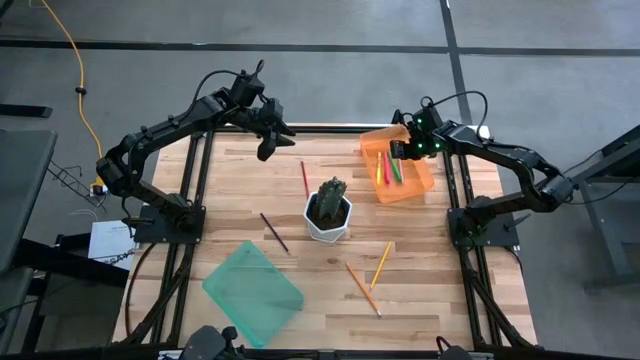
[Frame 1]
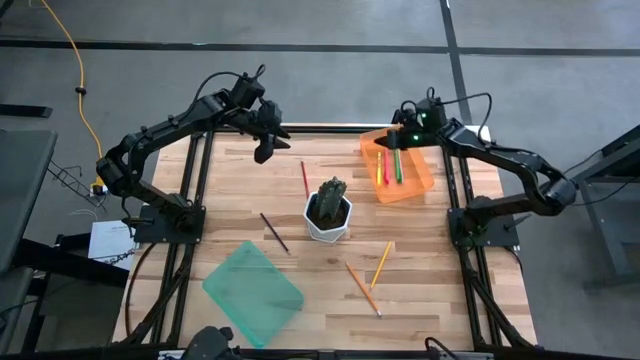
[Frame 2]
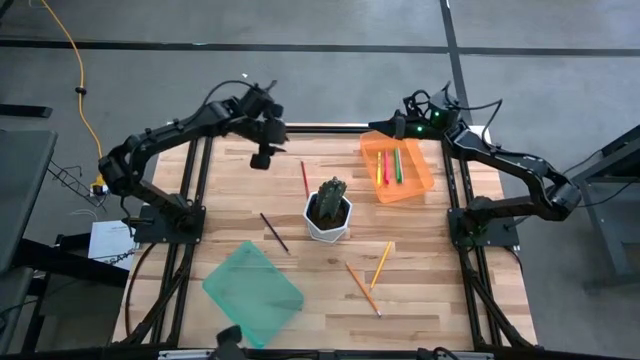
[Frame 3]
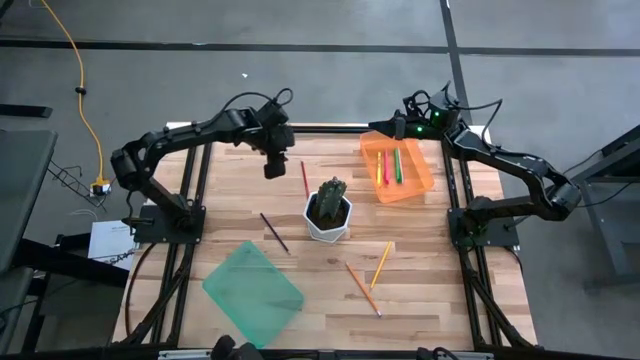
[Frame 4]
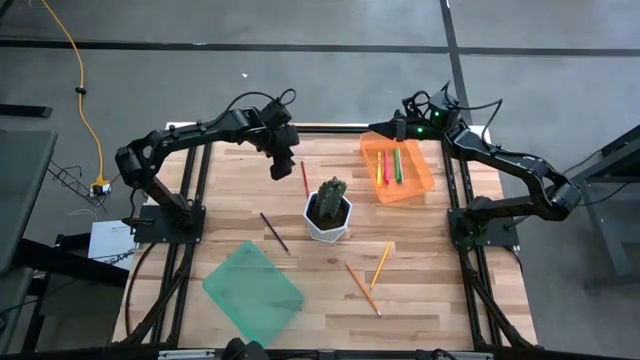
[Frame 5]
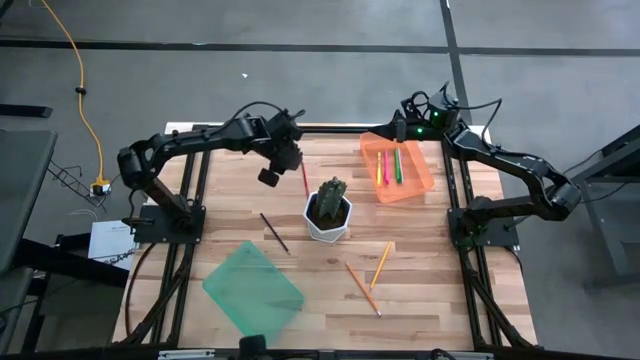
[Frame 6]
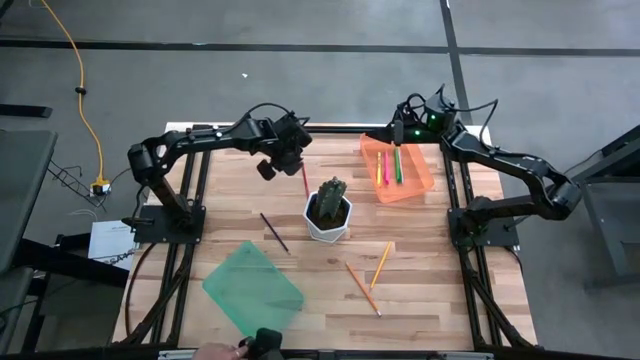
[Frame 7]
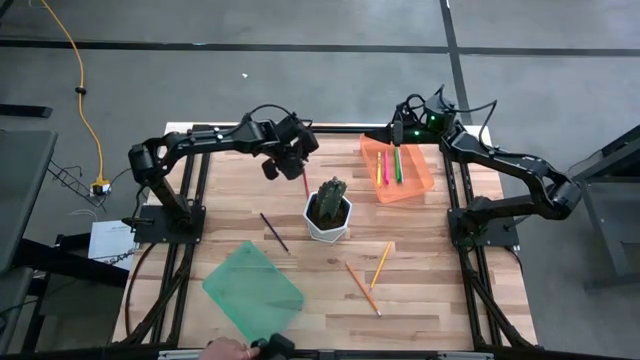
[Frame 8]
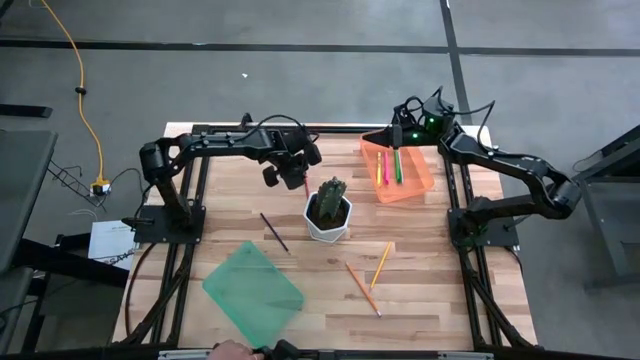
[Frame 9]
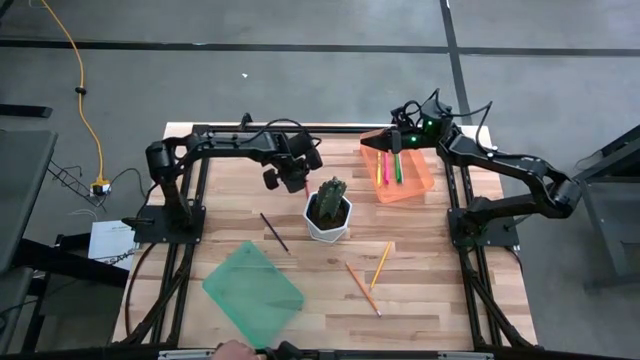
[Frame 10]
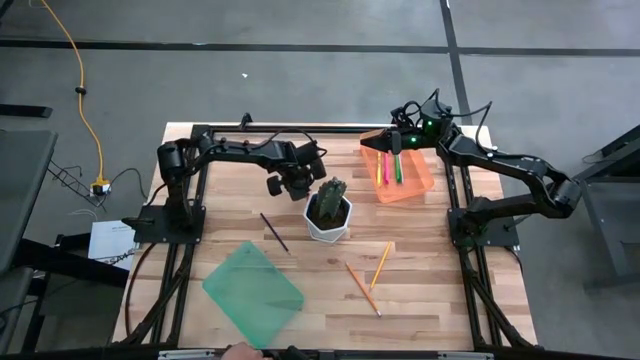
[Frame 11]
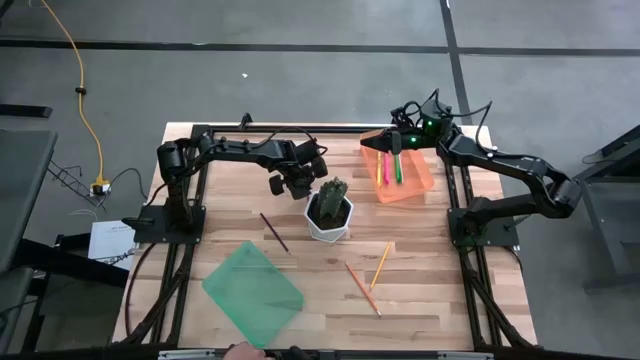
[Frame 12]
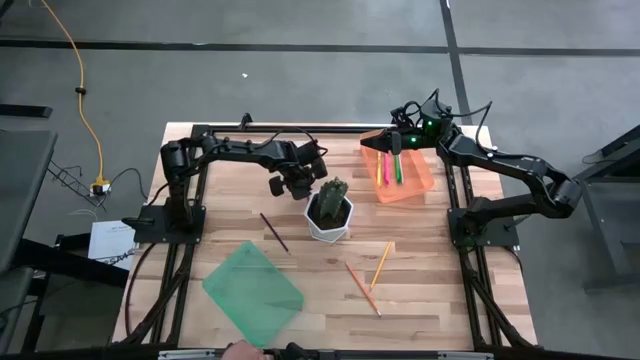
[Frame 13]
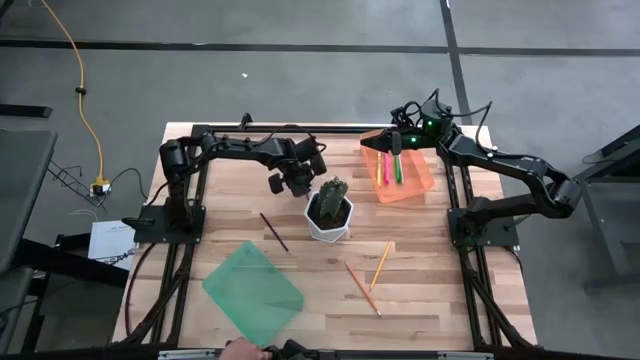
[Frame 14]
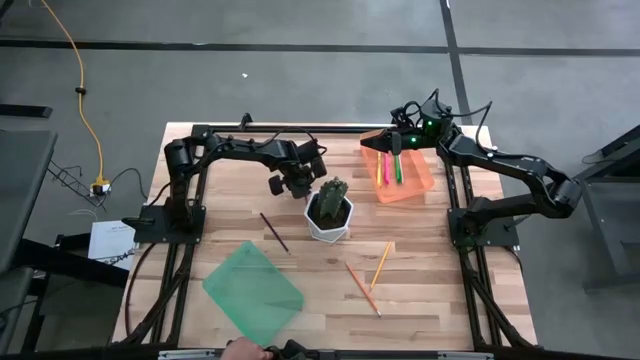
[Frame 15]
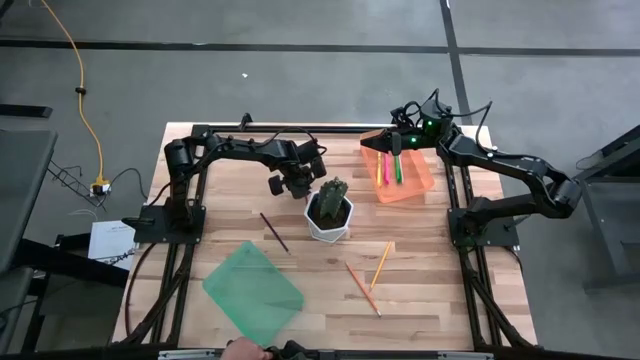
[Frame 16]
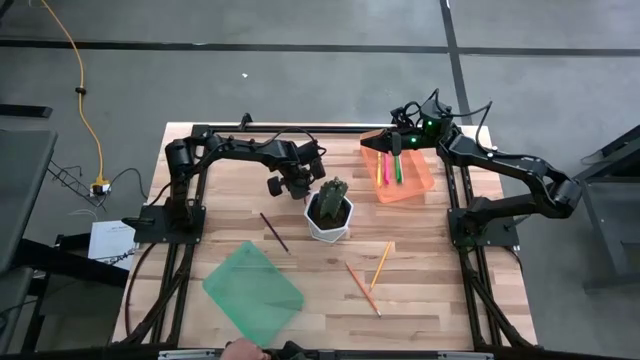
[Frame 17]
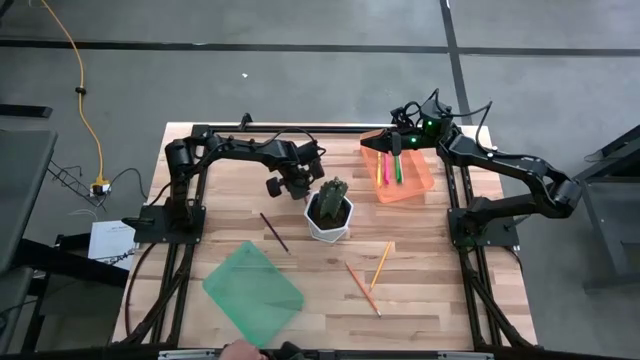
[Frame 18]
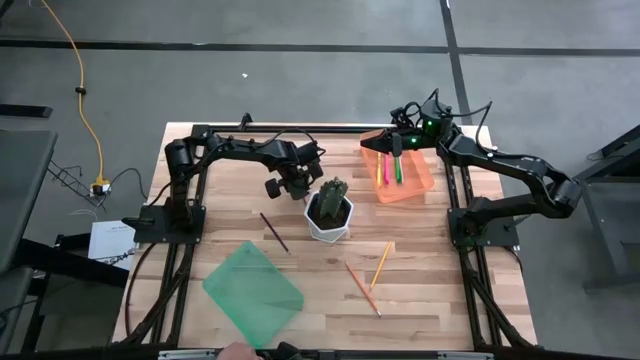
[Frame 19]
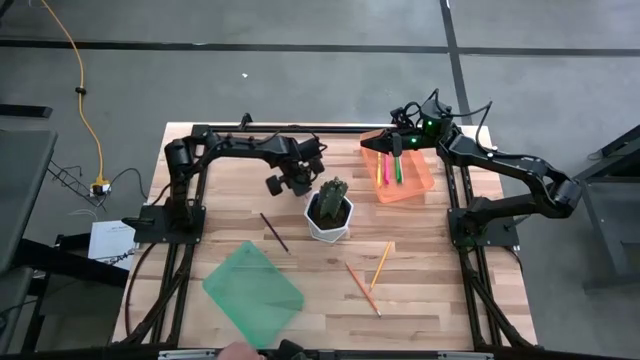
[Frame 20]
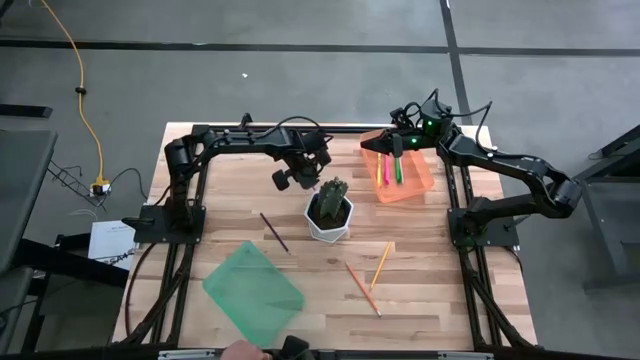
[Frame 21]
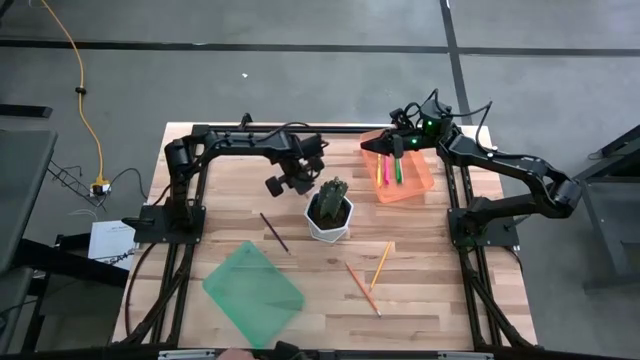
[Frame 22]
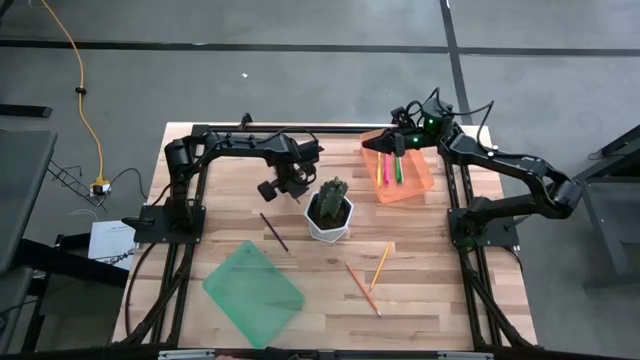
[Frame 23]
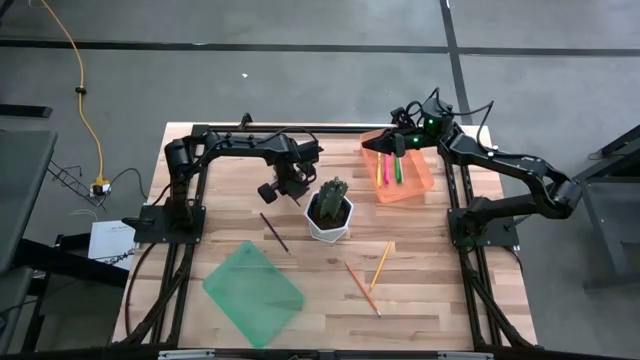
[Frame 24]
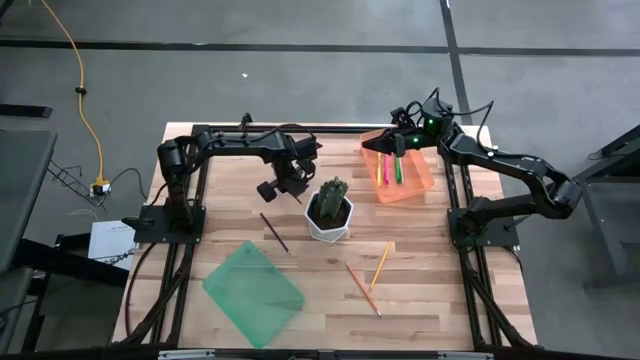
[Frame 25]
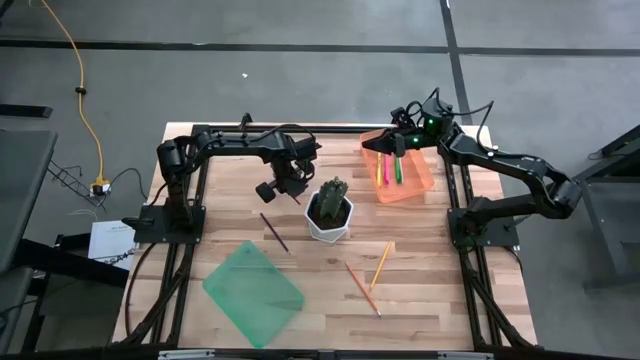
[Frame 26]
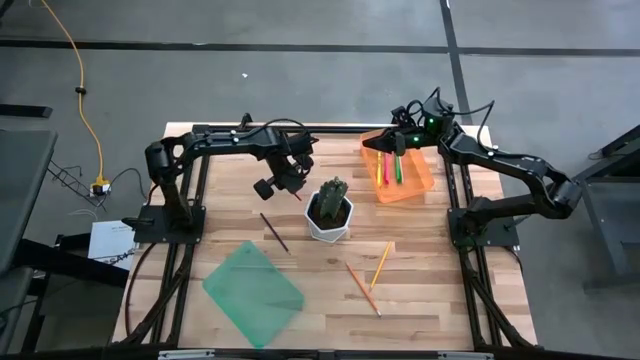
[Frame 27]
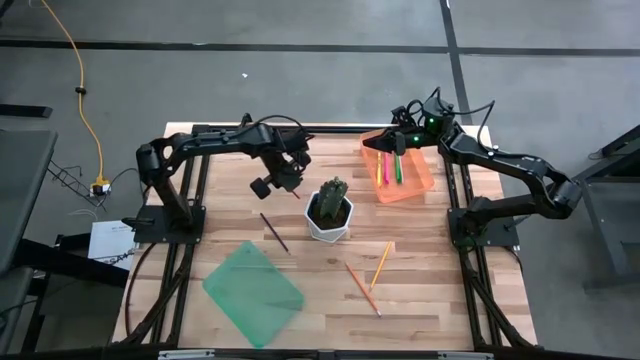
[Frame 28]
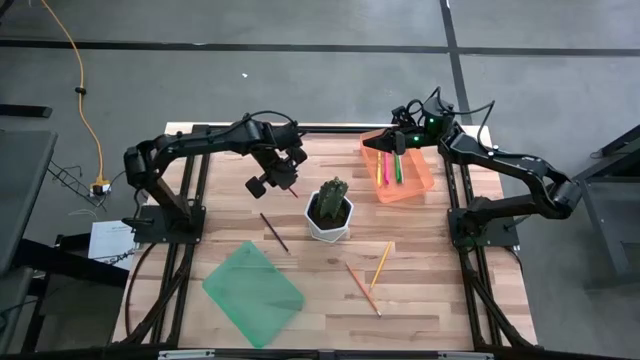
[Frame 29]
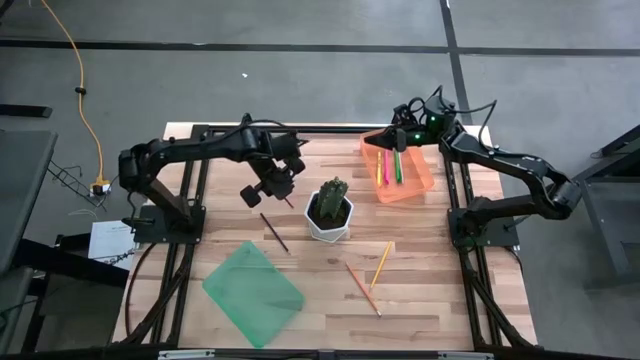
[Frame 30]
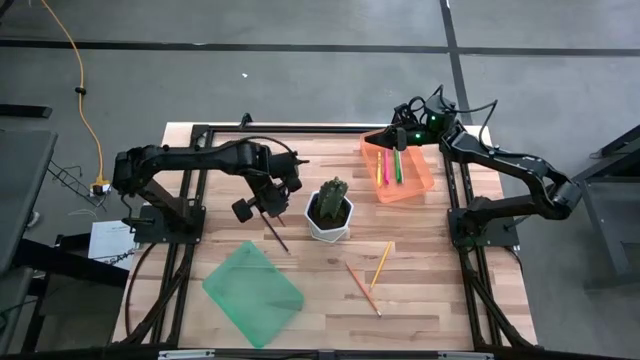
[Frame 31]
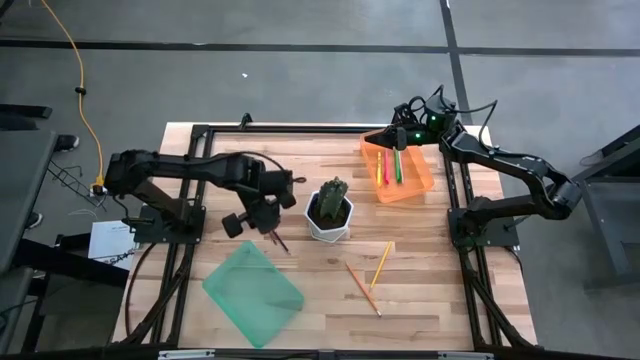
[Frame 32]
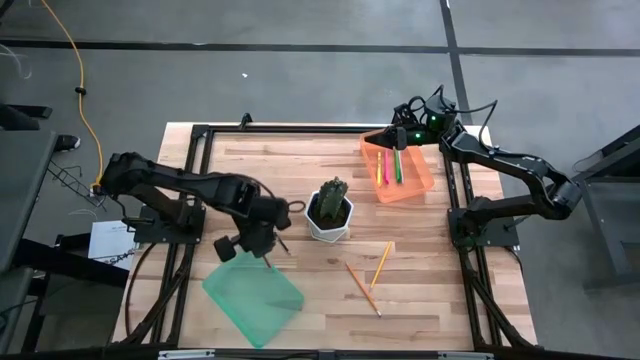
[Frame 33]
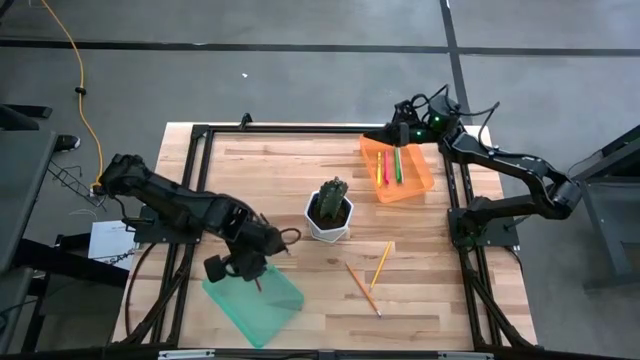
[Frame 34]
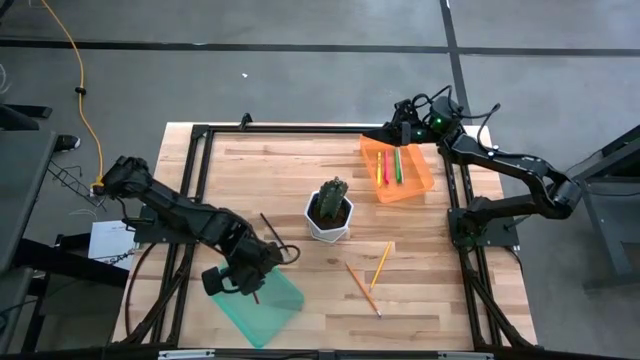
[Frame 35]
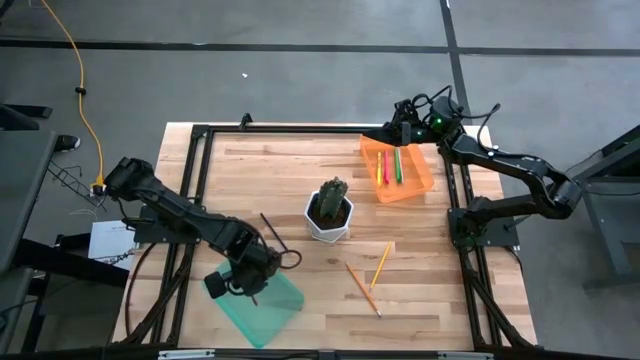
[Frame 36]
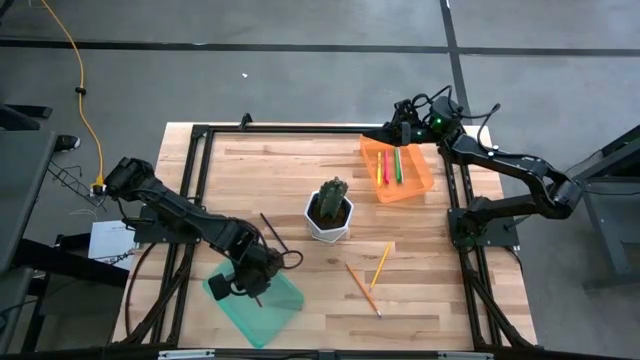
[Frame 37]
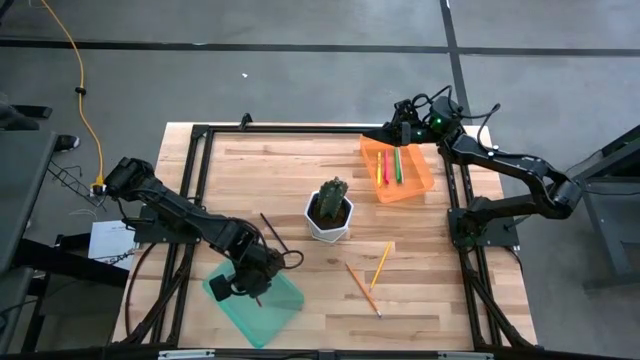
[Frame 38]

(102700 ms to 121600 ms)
Task: Sort pens & pencils
Put the red pencil into the green bin

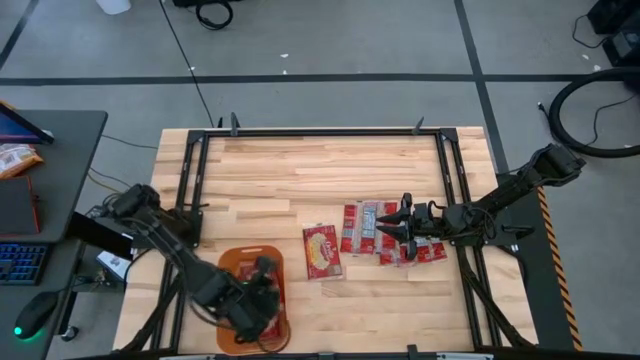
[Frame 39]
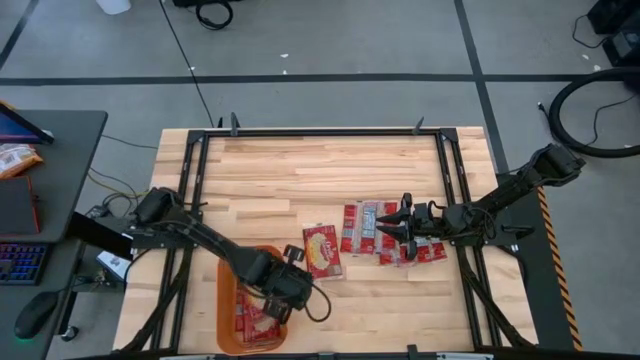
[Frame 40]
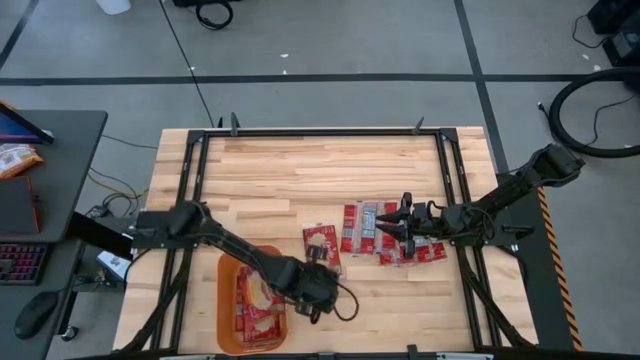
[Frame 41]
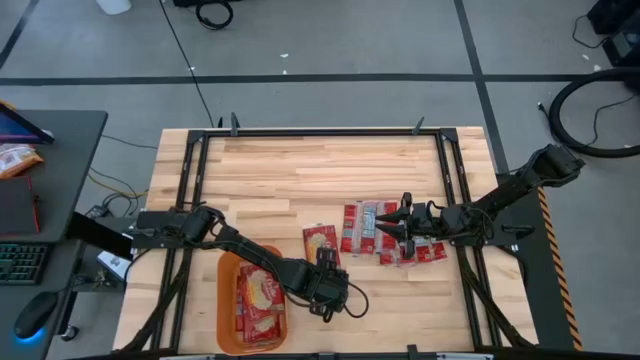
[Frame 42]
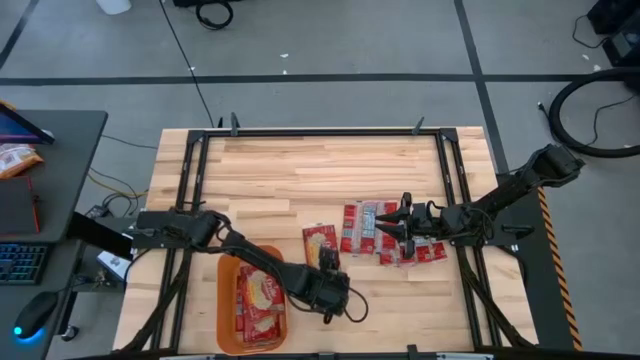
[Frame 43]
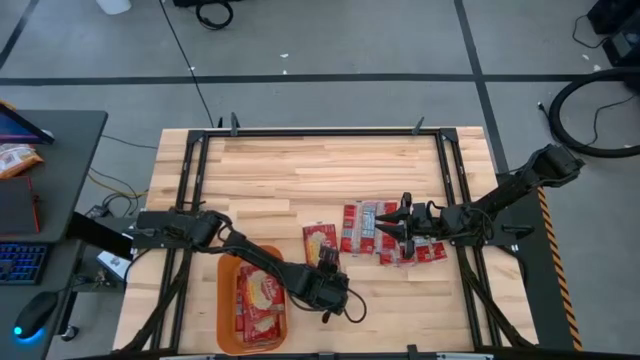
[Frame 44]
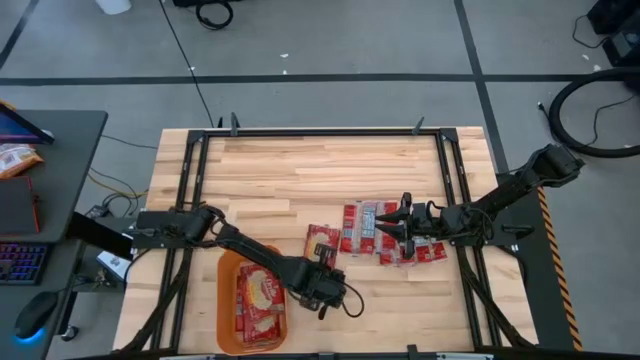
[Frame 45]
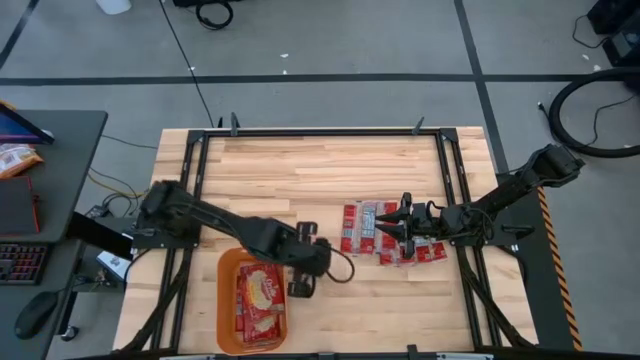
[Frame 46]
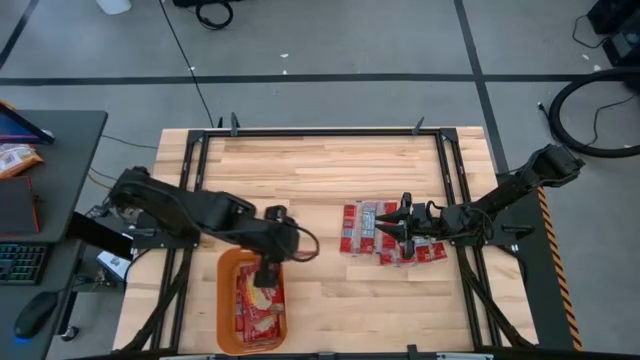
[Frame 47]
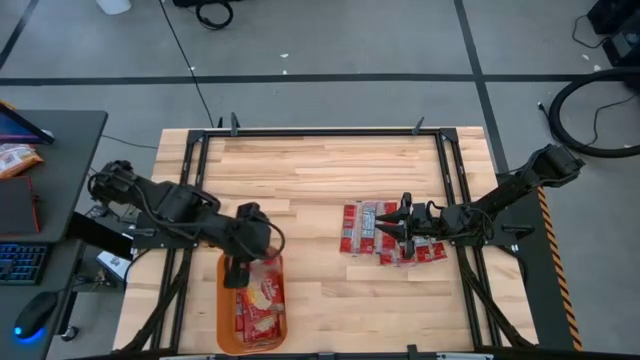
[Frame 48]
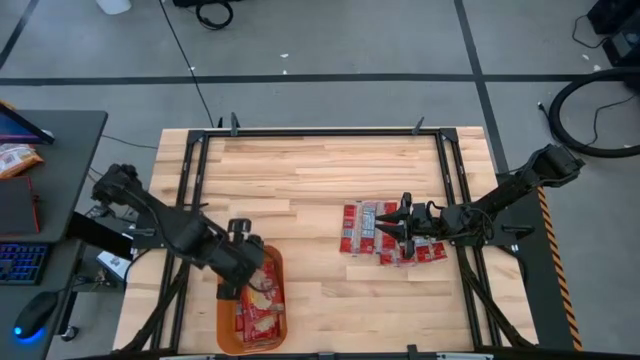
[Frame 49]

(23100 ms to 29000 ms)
Task: Sort popcorn bags into baskets
Put the red popcorn pack into the orange bin
